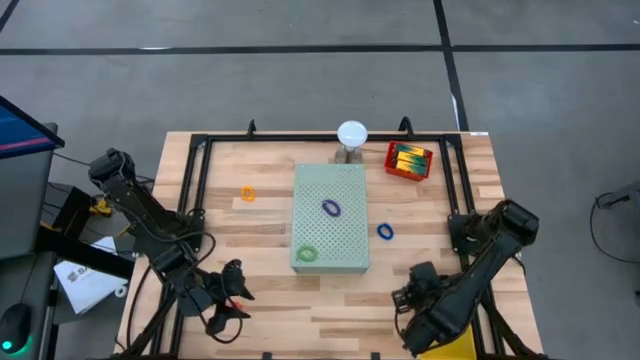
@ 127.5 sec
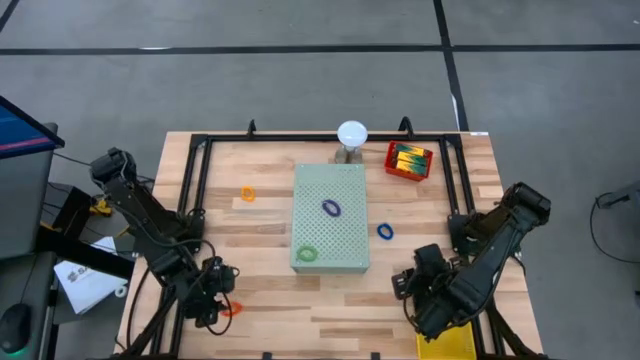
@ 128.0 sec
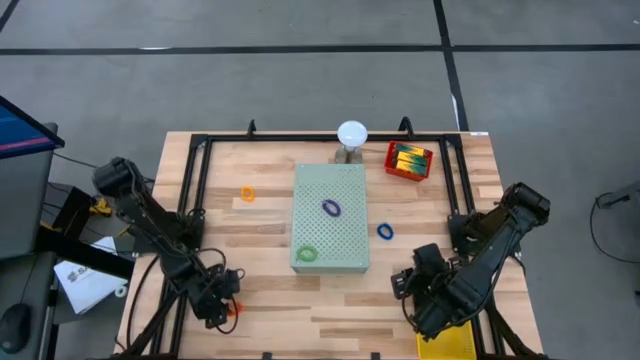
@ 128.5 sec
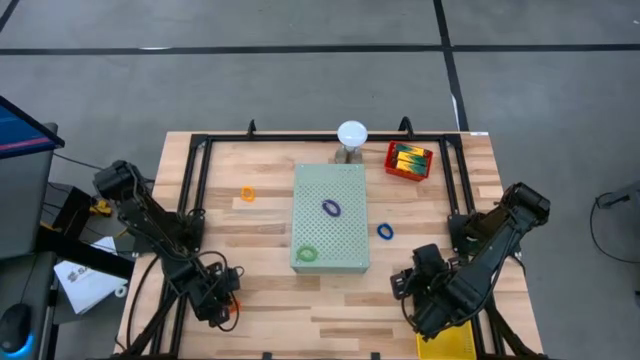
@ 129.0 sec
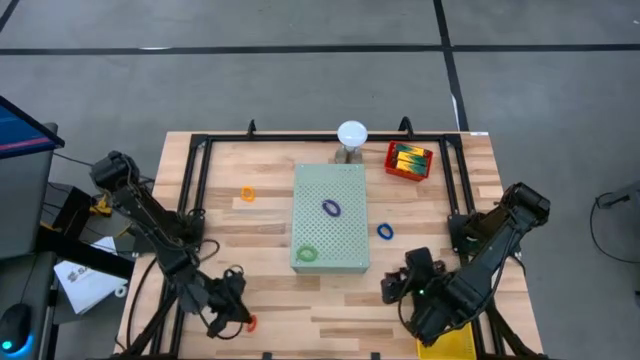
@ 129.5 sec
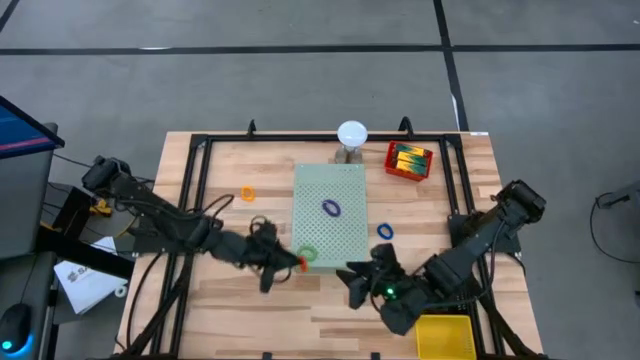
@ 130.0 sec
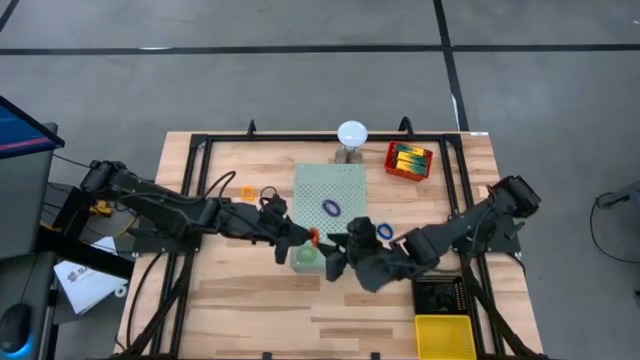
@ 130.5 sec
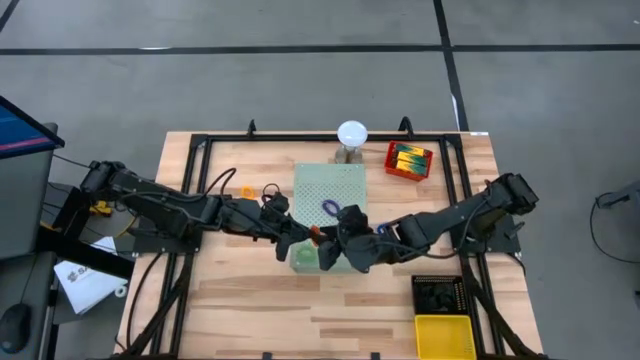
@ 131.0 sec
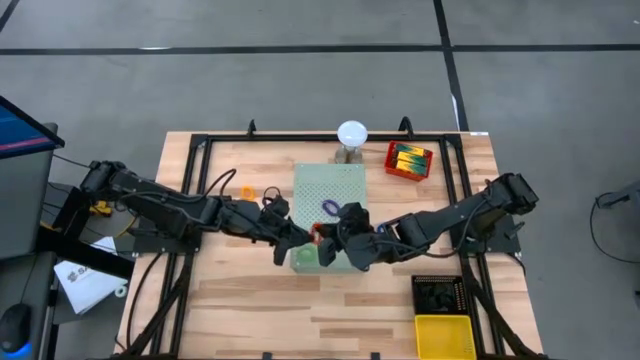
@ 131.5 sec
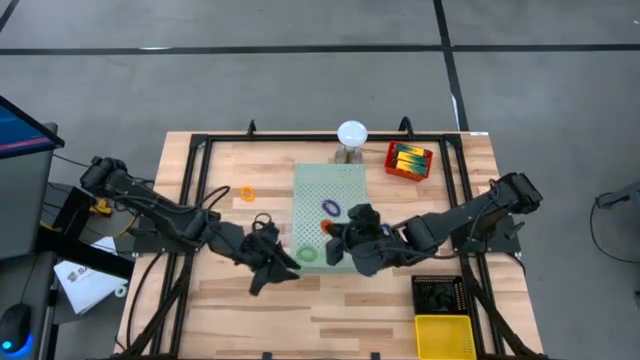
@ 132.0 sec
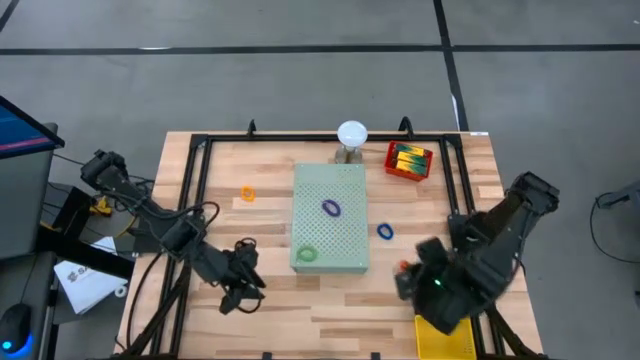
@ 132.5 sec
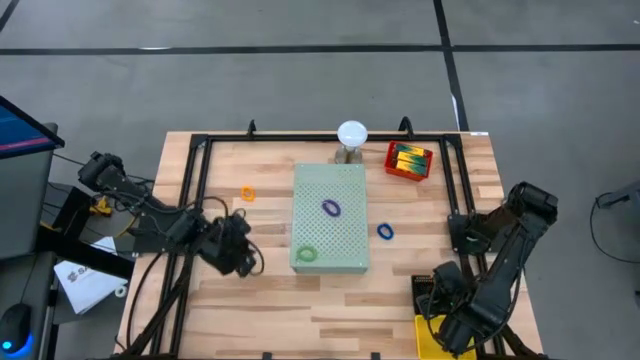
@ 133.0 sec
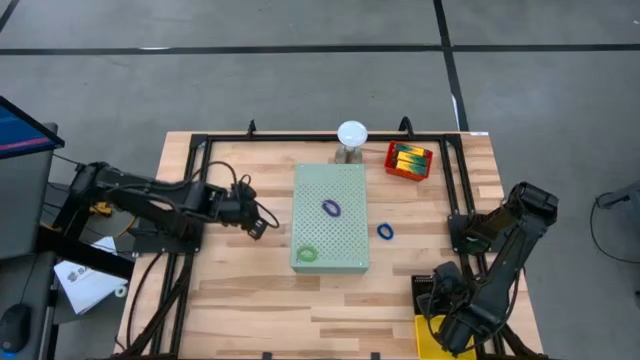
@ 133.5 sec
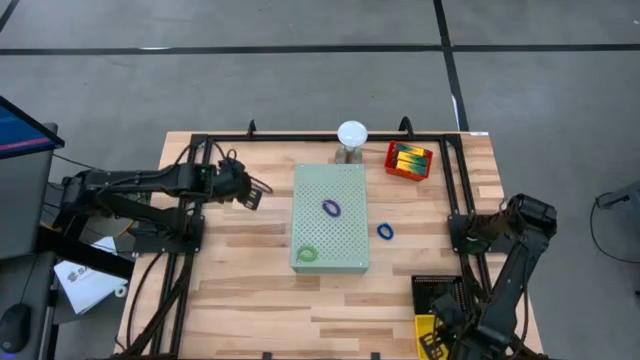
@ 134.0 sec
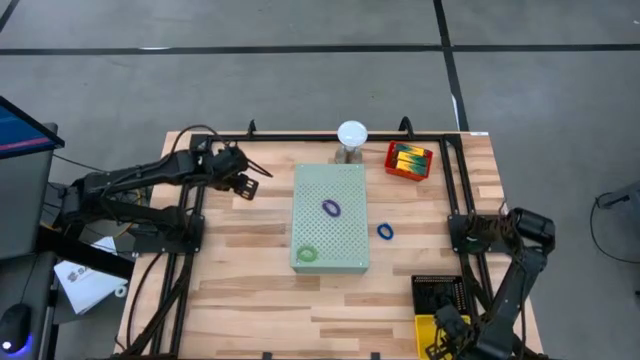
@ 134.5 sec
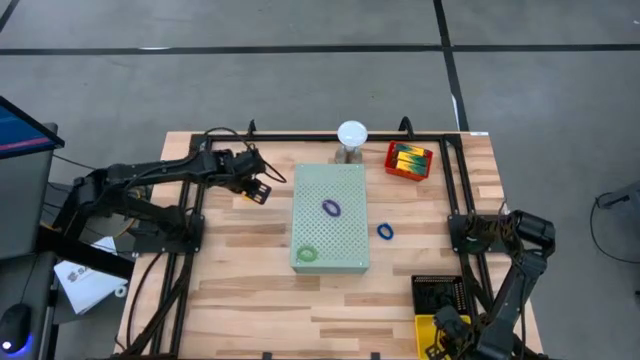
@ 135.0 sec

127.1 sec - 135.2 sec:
Task: Pick & Place Office Desk Supplies
Put the red spring keychain into the yellow bin

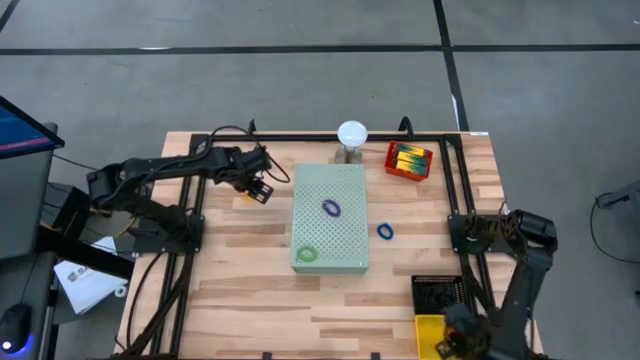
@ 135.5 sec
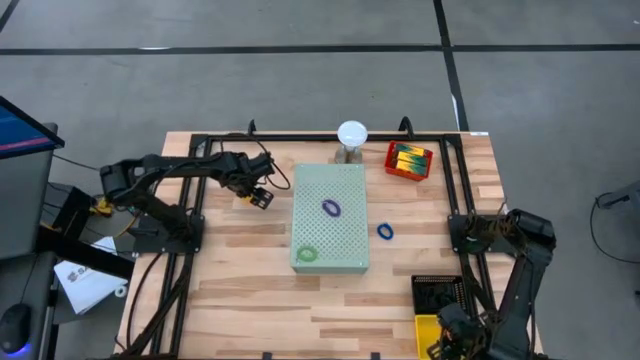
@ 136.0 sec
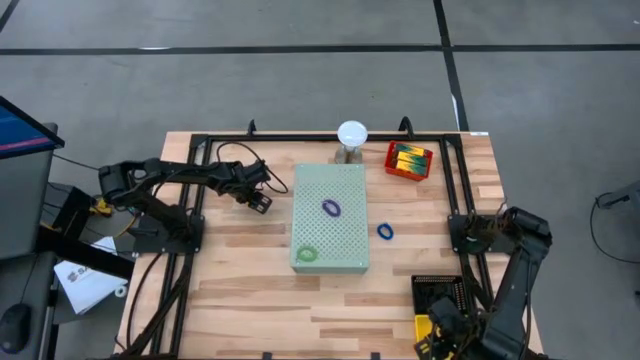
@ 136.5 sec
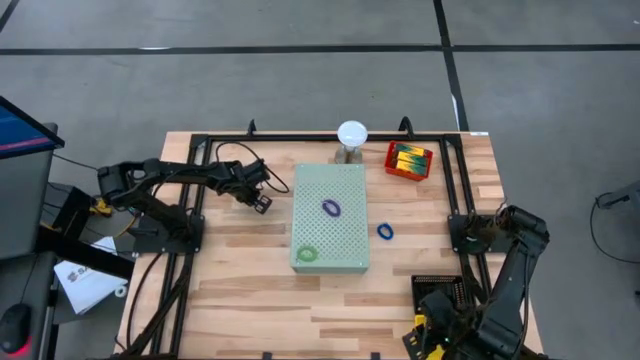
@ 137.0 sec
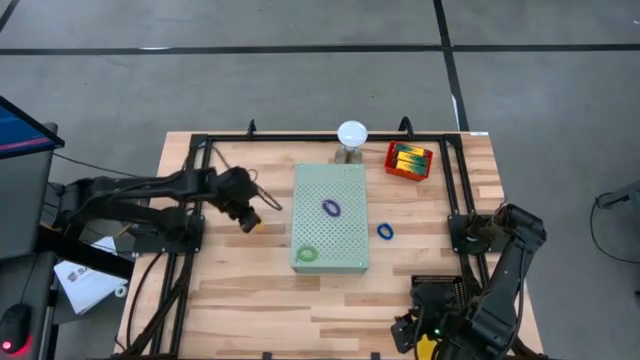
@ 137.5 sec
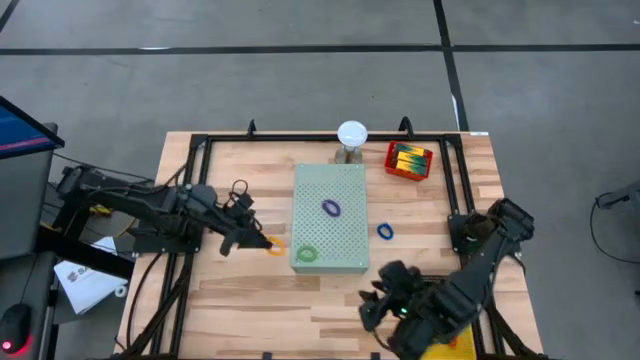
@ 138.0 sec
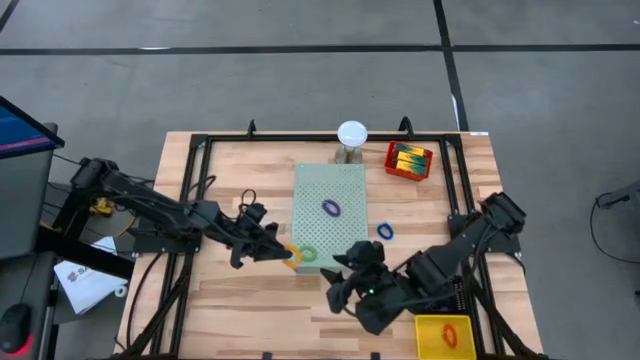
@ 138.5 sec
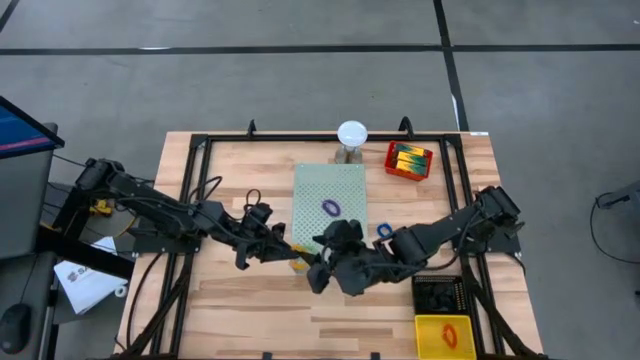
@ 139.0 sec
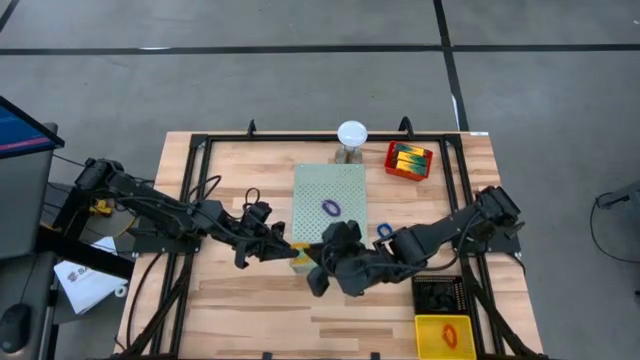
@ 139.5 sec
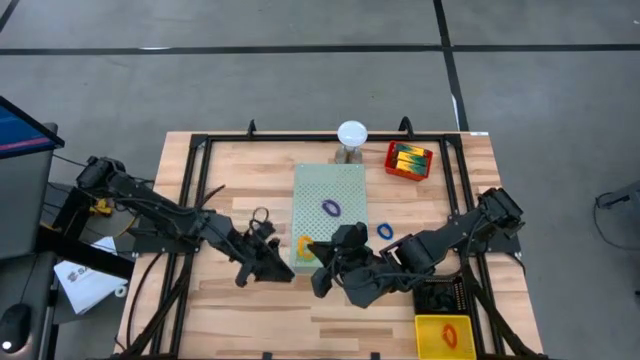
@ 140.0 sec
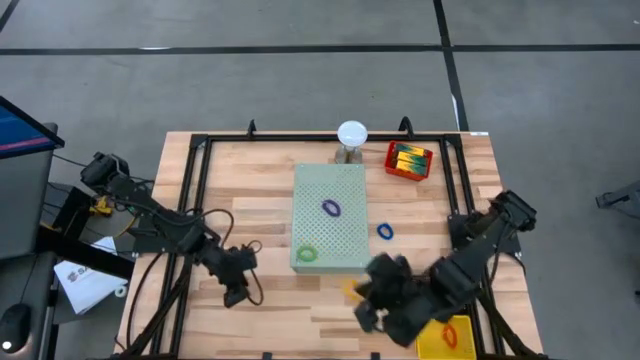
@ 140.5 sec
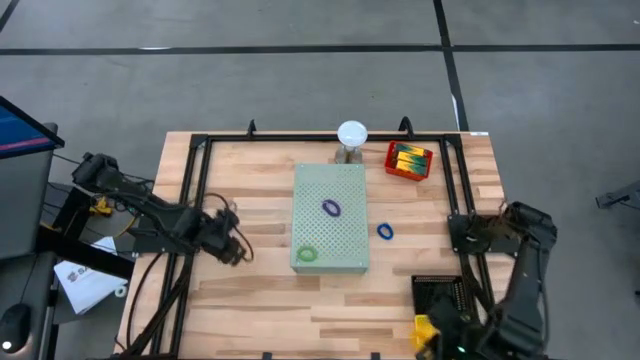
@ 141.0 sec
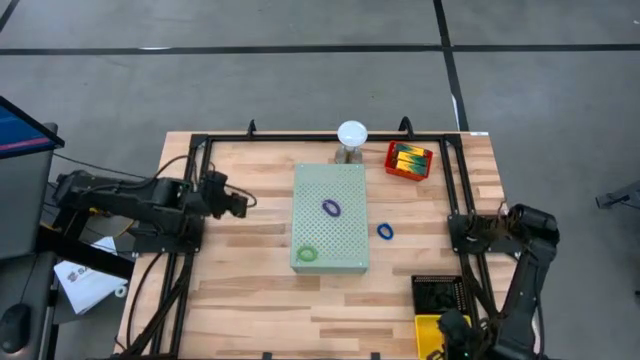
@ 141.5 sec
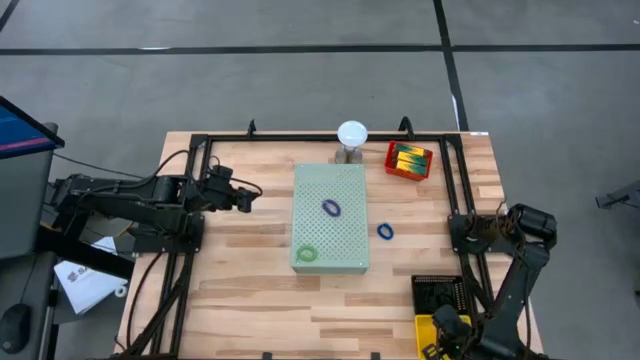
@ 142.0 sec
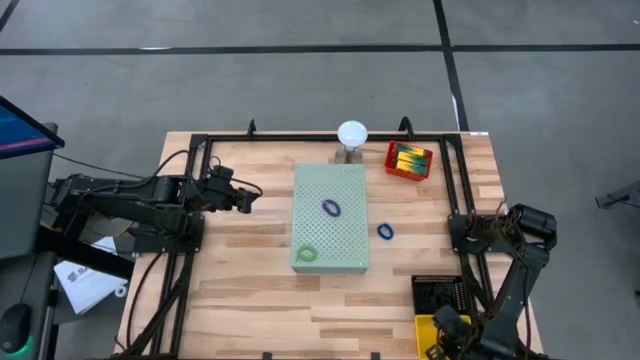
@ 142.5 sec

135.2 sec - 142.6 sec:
Put the yellow spring keychain into the yellow bin

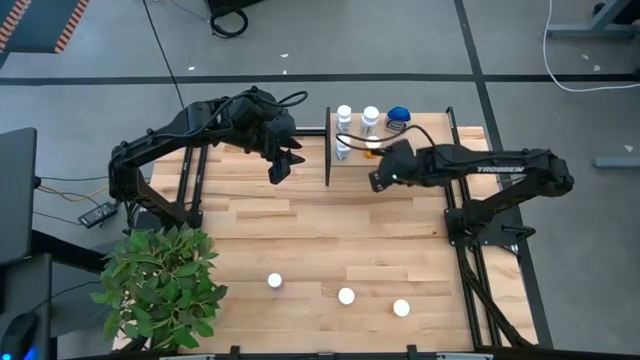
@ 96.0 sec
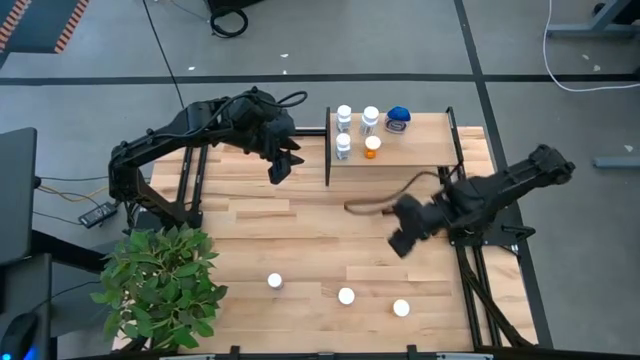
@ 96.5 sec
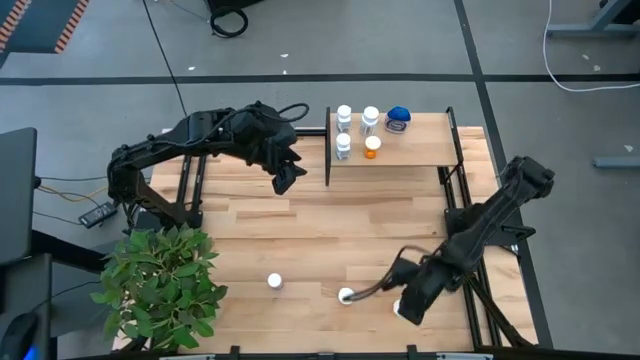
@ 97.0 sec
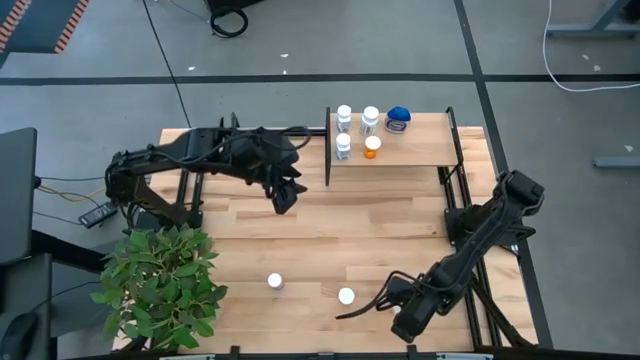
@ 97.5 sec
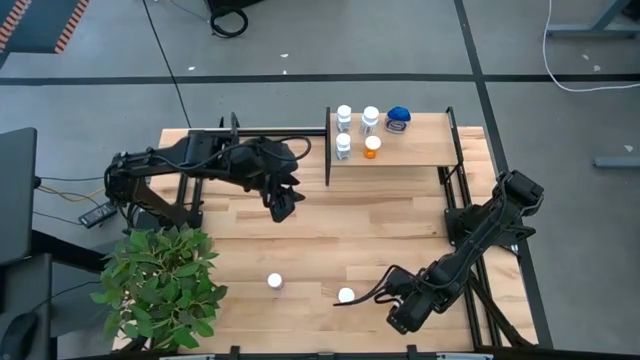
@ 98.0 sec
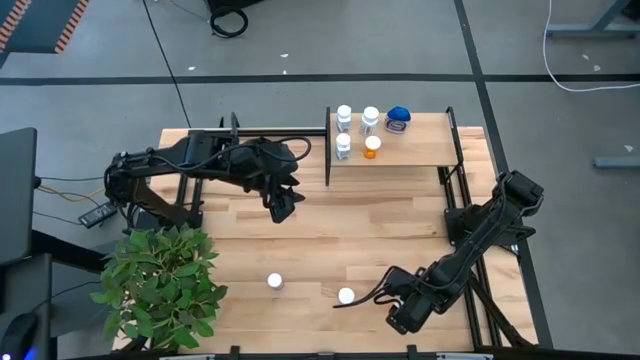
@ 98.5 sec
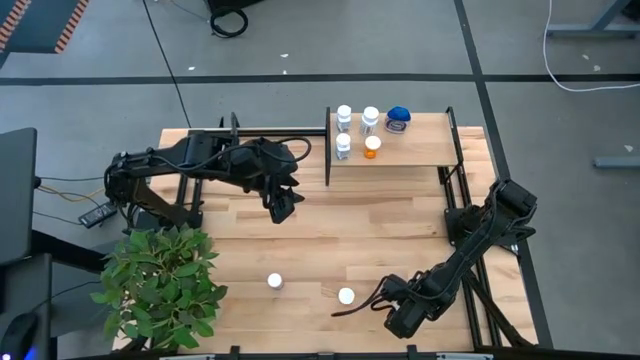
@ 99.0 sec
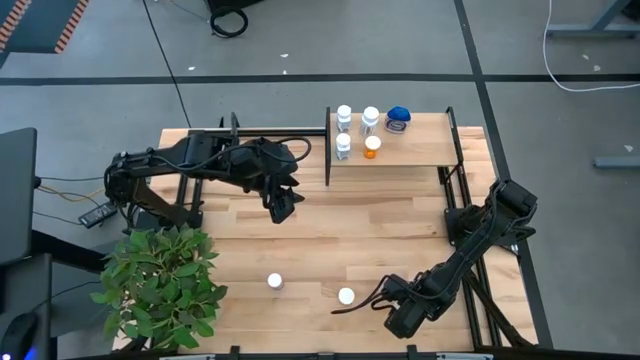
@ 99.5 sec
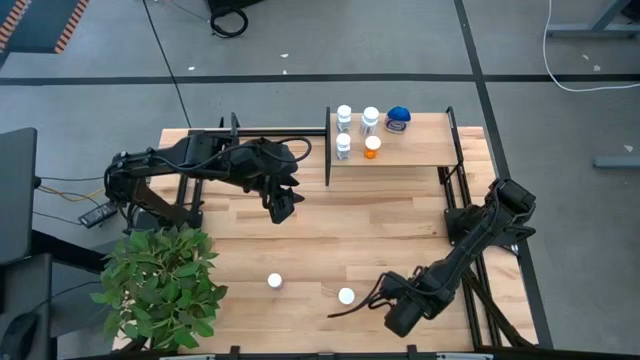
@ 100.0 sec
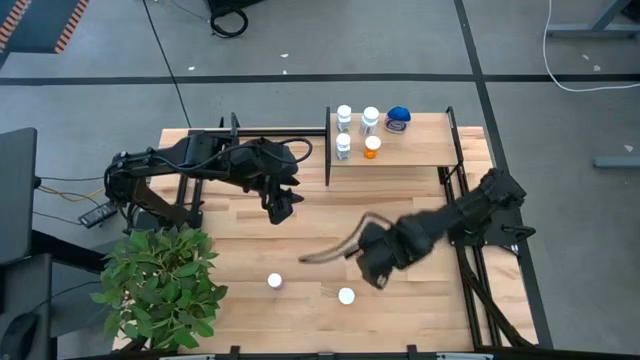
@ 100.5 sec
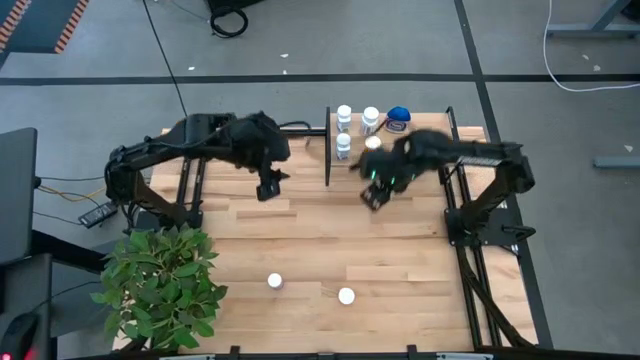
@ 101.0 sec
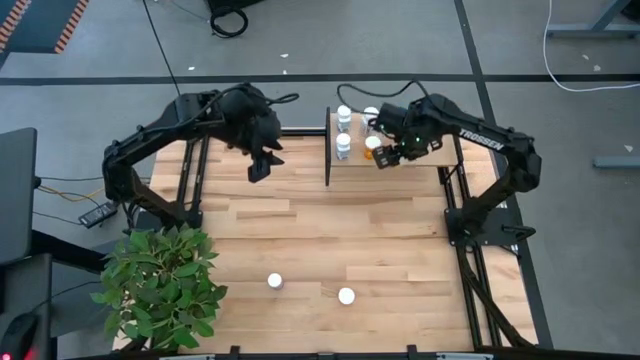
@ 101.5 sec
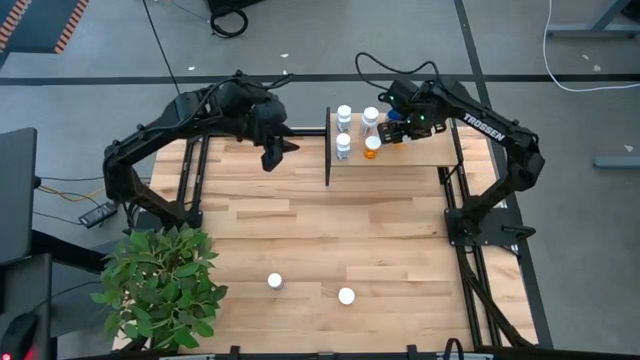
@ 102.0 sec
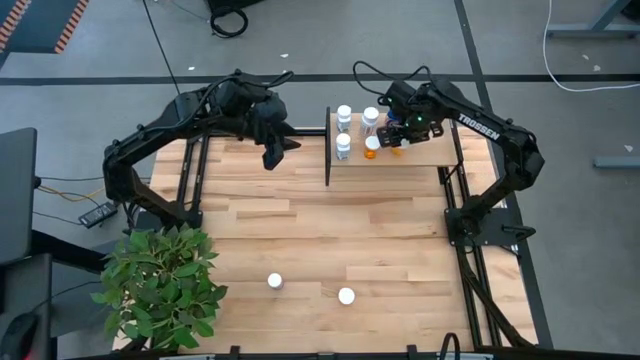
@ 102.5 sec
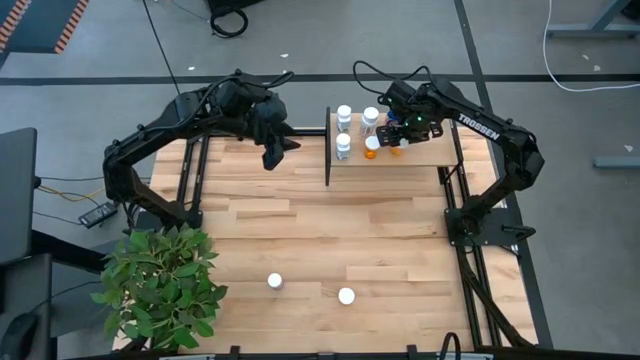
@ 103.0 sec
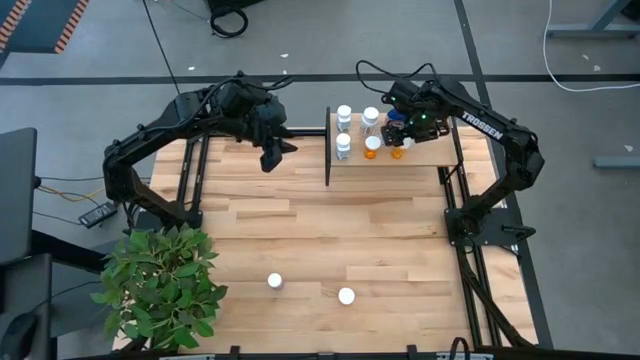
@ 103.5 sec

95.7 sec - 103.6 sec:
Task: Pick and place medicine bottles onto shelf by color
Put the right orange medicine bottle on the shelf
